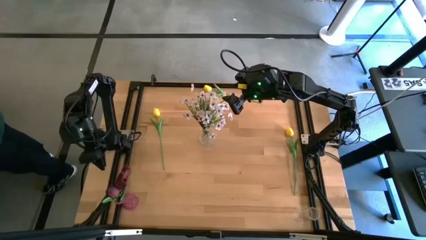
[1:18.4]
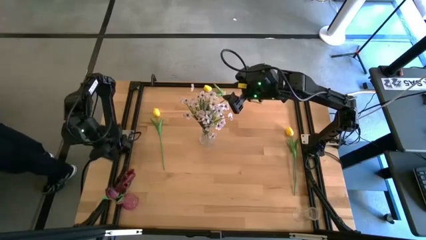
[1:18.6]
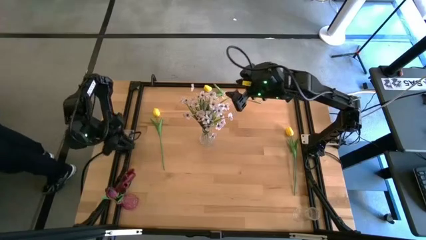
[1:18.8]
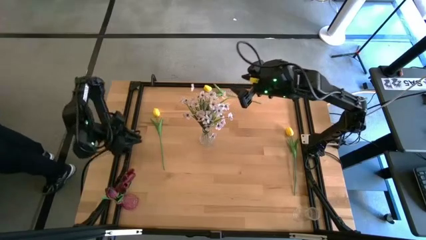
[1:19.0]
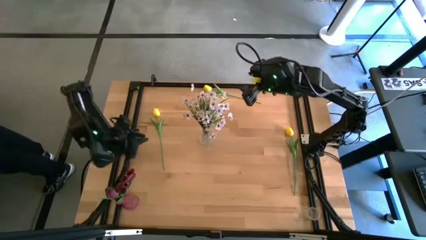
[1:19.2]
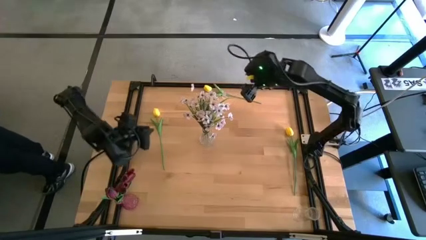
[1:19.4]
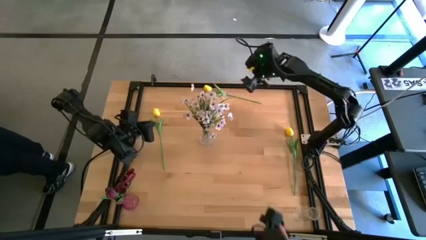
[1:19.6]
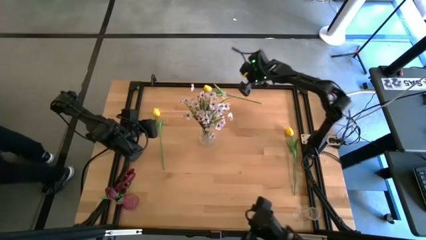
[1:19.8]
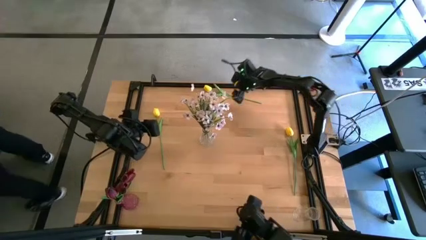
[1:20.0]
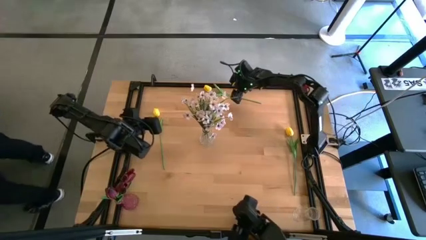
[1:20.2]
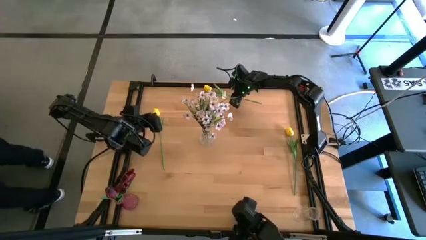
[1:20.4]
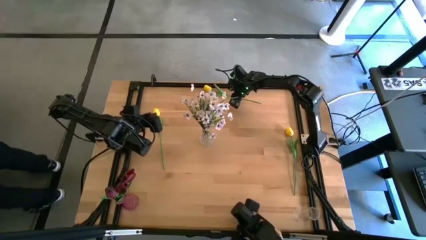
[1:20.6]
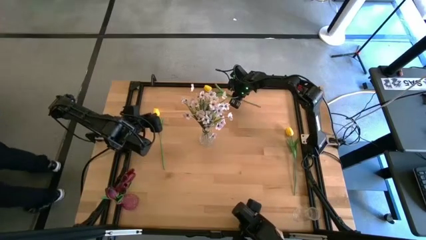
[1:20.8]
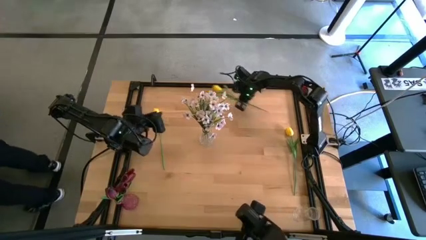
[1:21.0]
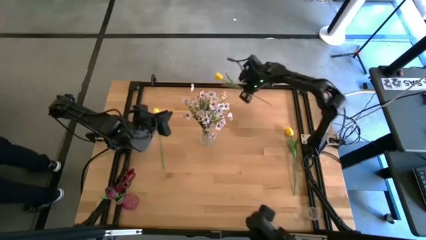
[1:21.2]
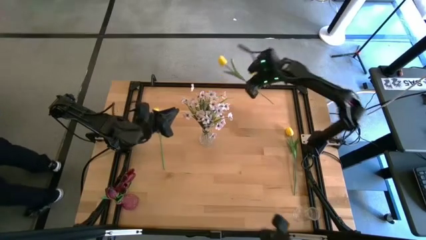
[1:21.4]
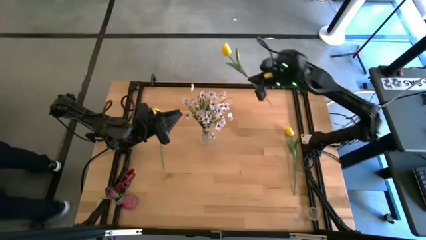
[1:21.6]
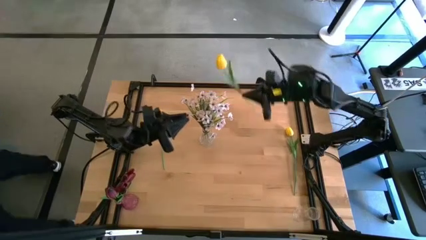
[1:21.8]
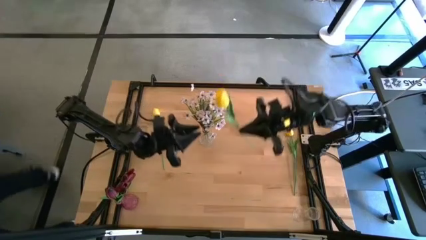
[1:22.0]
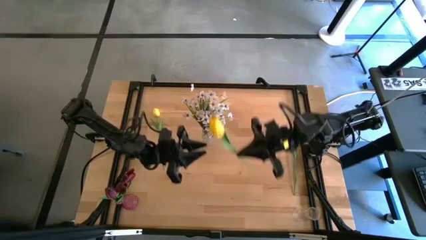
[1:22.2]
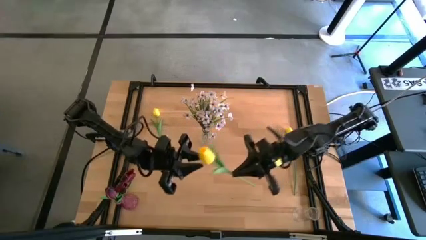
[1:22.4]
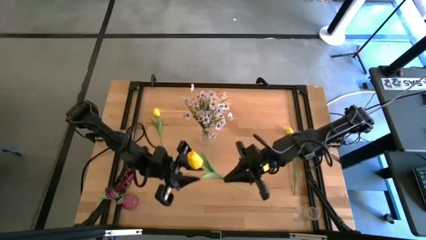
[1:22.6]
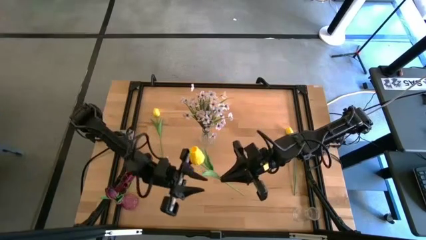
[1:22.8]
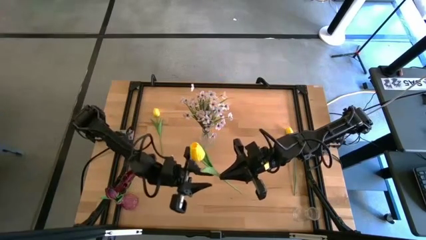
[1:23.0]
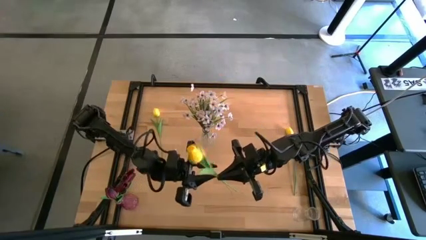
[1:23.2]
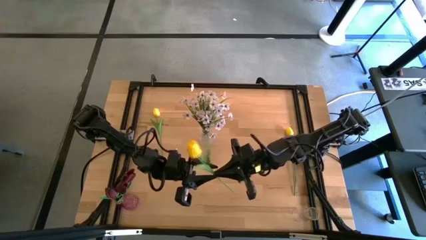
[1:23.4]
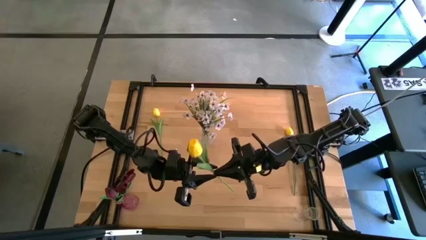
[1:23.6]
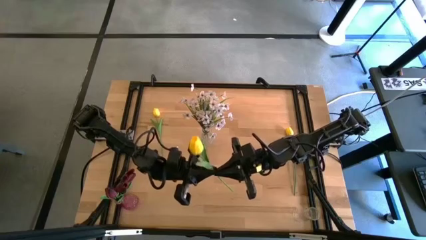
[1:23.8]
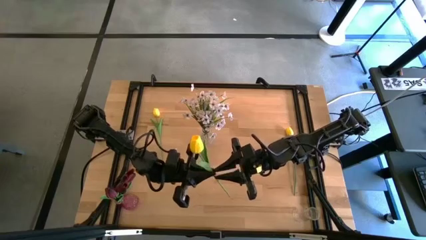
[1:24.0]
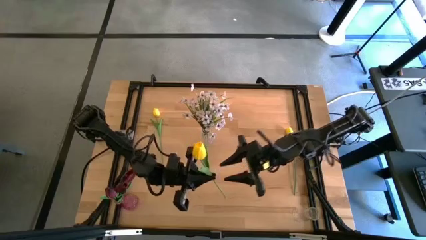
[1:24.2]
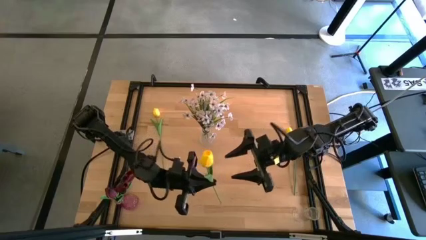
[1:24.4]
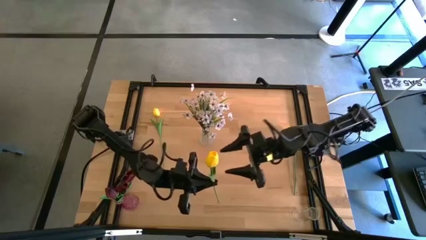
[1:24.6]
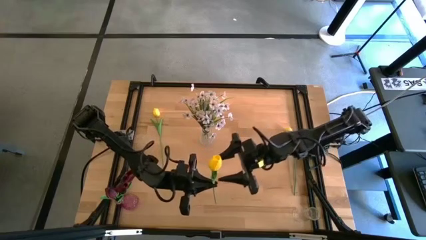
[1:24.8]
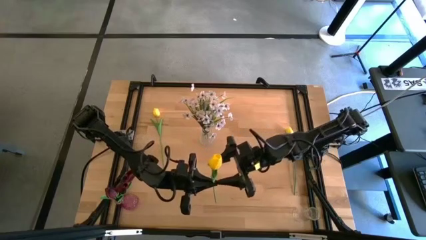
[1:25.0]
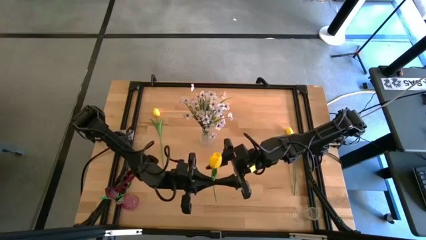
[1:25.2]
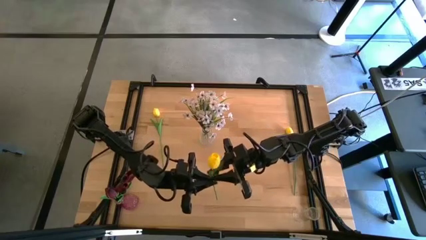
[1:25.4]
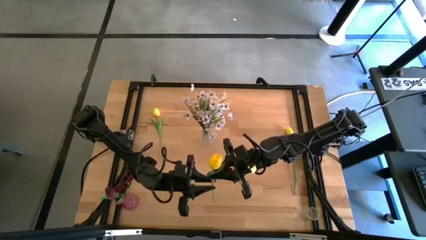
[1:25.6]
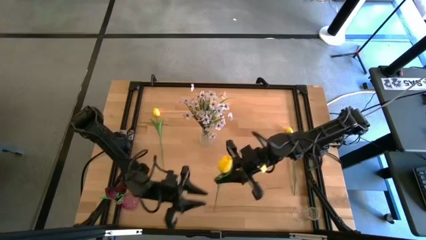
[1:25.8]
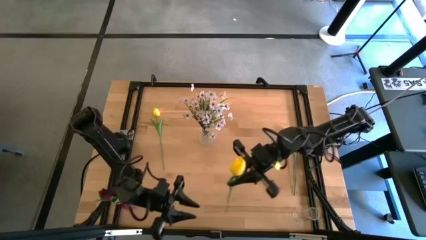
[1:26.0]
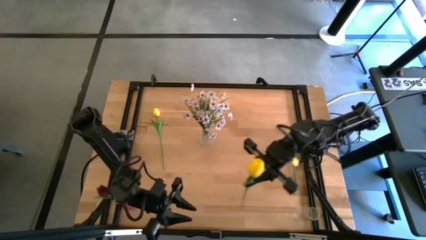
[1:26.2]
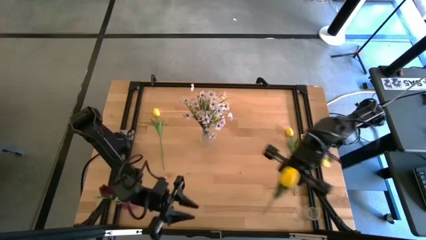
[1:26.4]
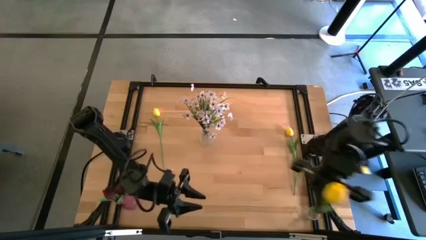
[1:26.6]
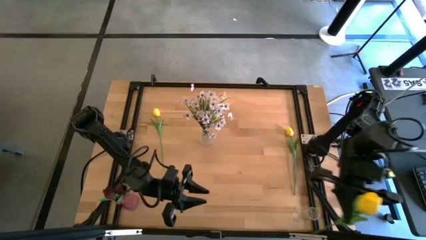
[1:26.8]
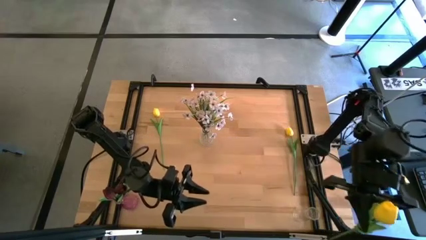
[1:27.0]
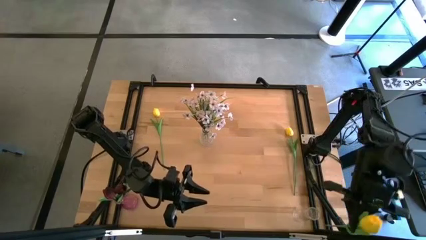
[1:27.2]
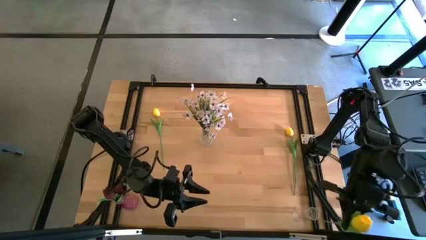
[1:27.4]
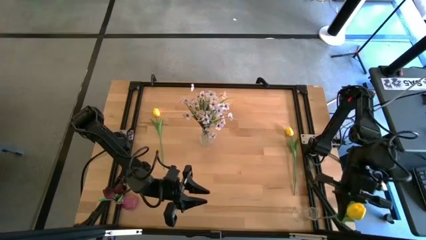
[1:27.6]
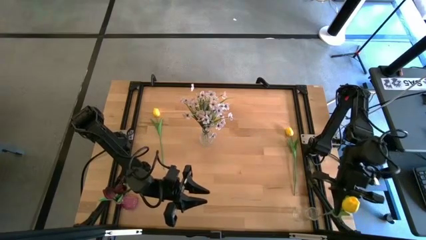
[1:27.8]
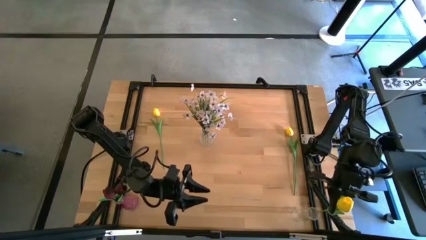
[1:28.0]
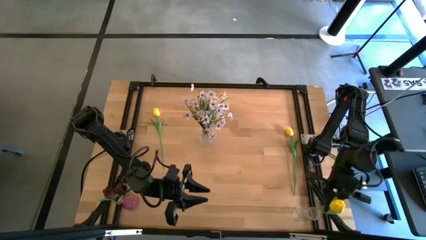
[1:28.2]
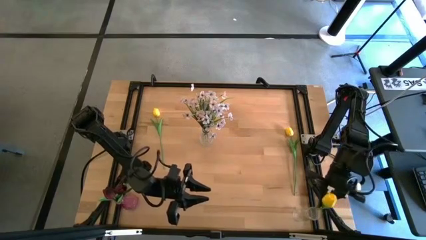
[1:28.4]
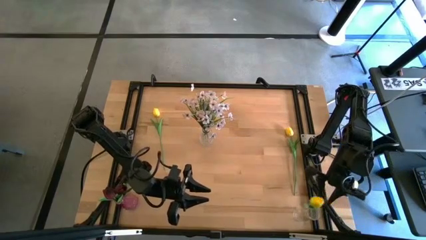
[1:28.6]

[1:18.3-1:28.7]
Task: Sort flowers into vase by color
Put the top yellow tulip into the bottom transparent vase

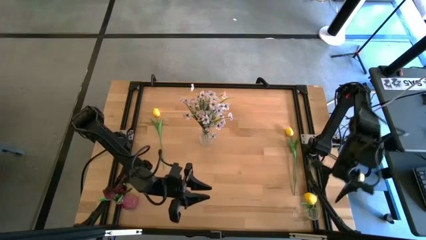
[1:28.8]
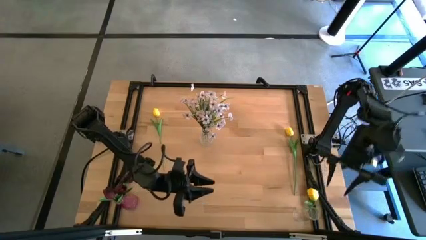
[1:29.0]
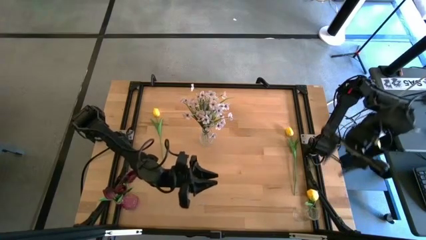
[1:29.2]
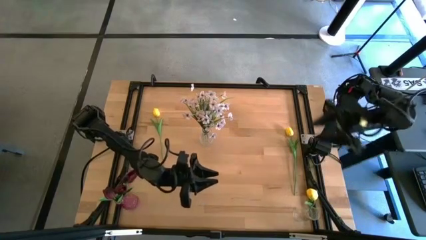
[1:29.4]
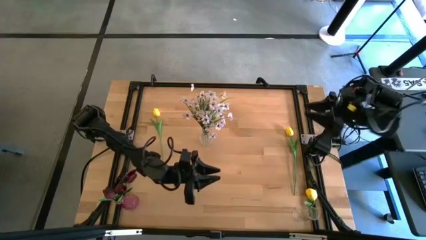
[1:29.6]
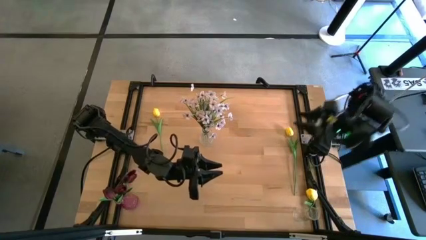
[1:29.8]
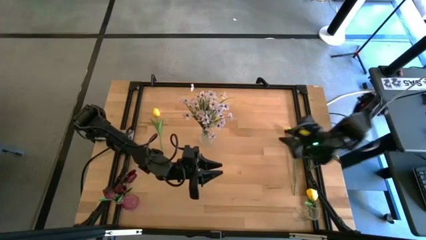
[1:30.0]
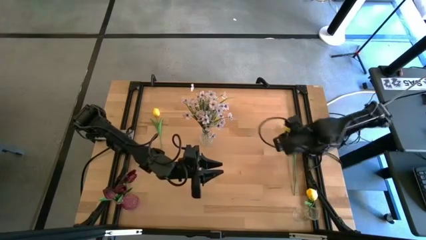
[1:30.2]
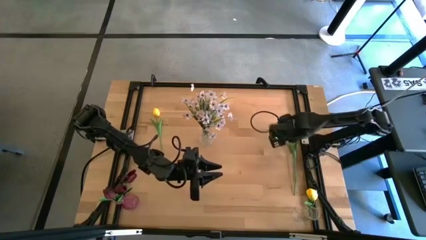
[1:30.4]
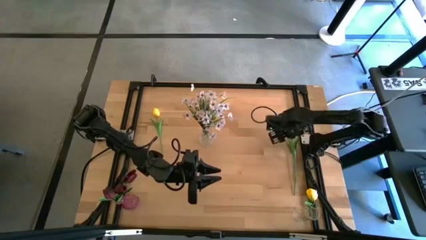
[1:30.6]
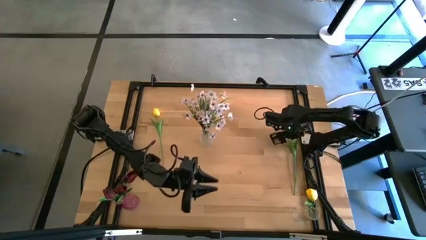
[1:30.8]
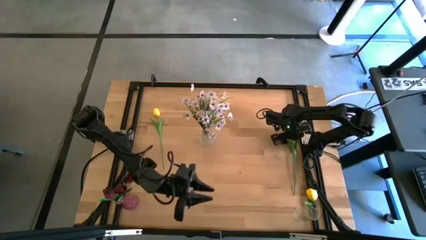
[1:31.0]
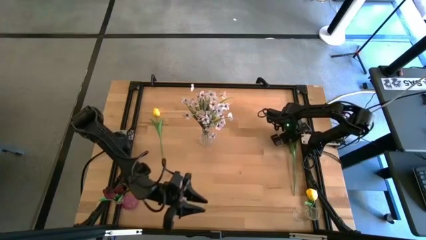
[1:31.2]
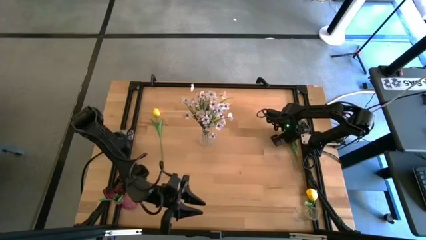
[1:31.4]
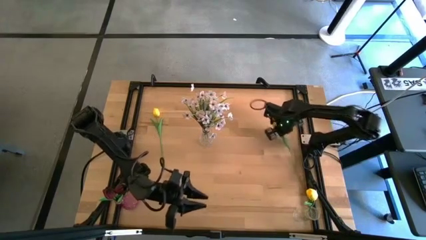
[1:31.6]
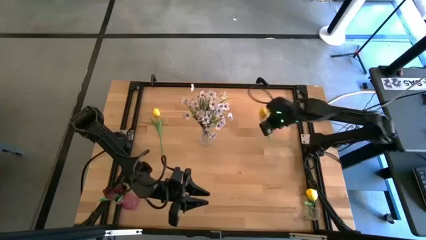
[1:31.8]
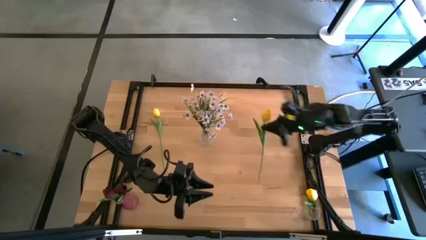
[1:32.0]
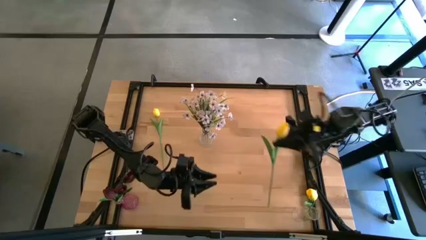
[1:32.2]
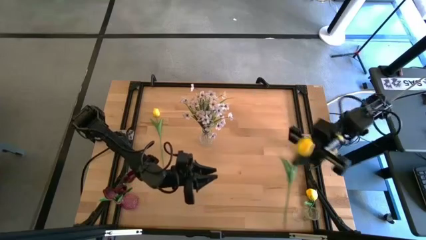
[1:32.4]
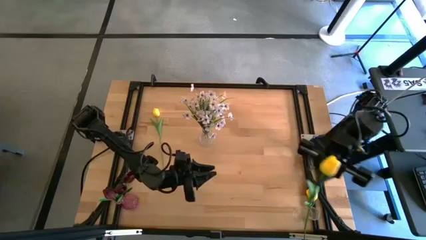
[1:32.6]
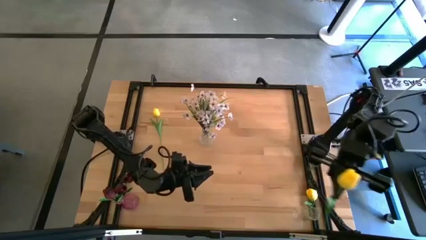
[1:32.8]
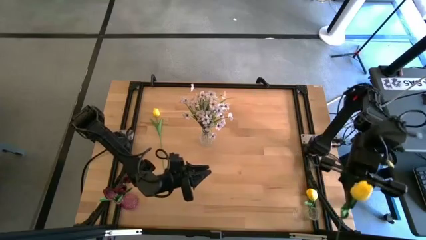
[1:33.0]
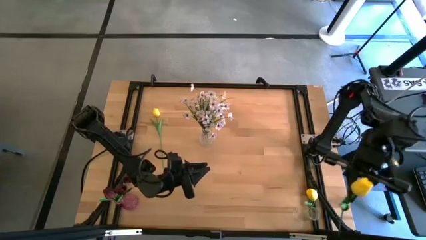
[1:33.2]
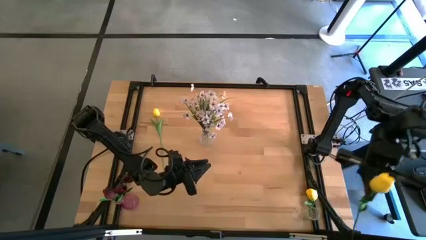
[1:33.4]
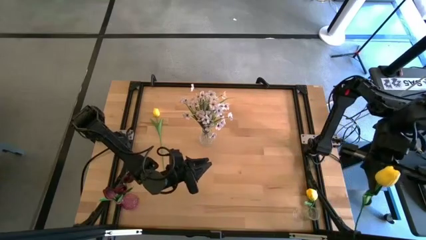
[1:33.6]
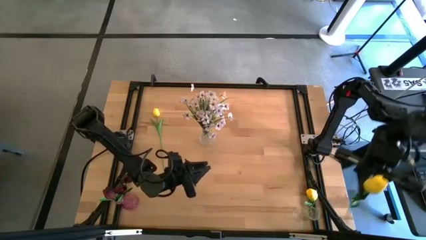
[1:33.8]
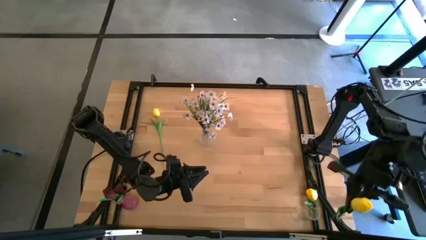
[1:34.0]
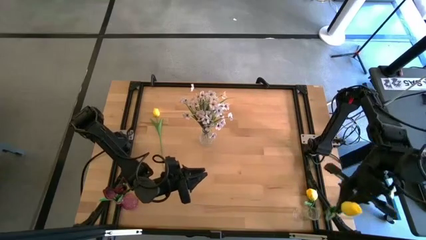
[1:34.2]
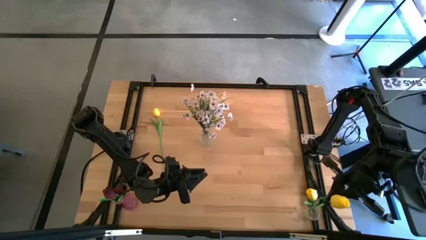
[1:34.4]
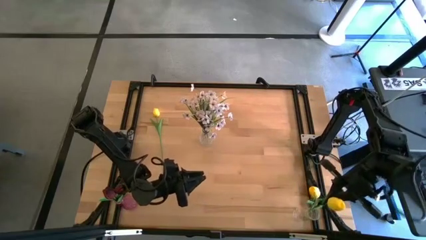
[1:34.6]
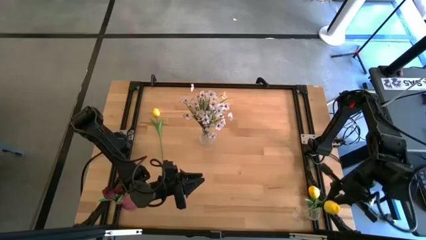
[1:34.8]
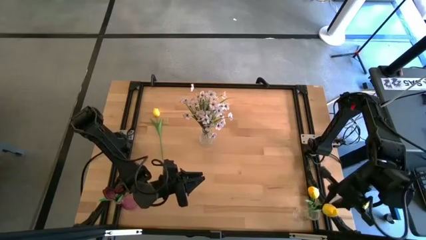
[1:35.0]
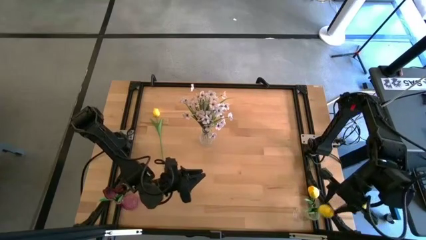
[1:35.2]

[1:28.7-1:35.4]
Put the right yellow tulip into the bottom transparent vase
